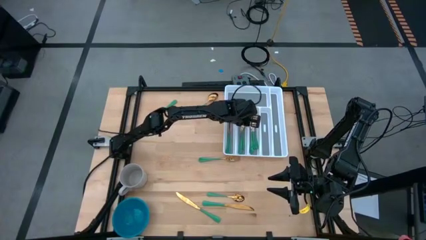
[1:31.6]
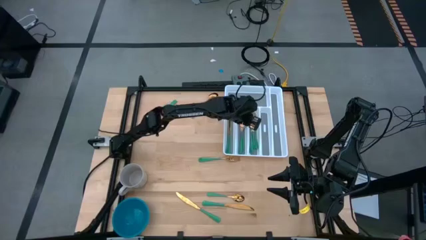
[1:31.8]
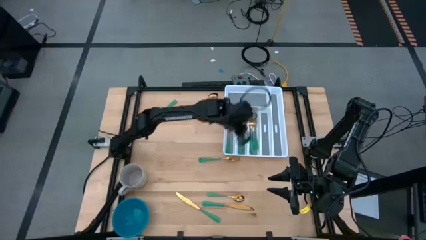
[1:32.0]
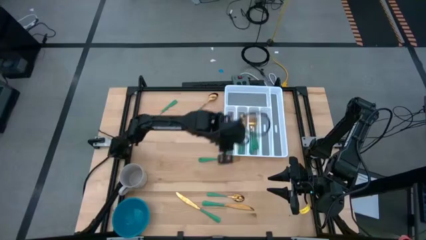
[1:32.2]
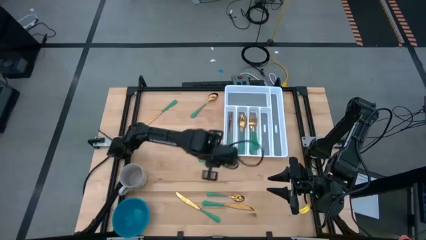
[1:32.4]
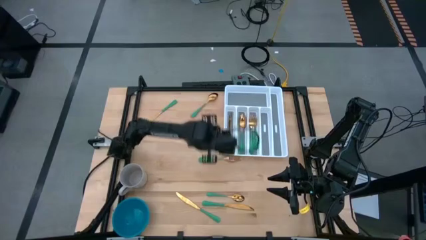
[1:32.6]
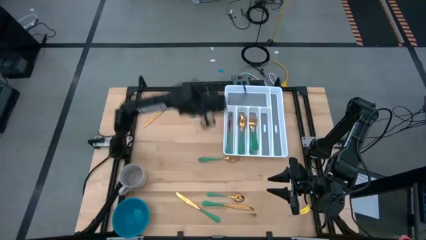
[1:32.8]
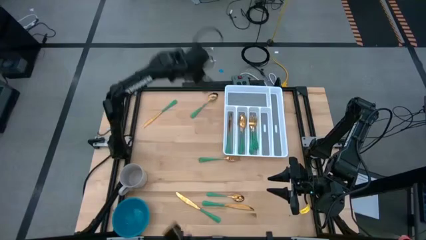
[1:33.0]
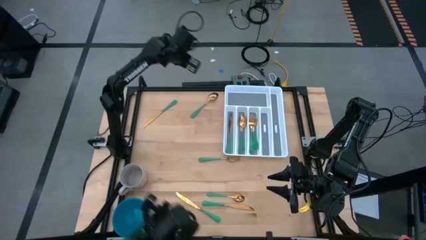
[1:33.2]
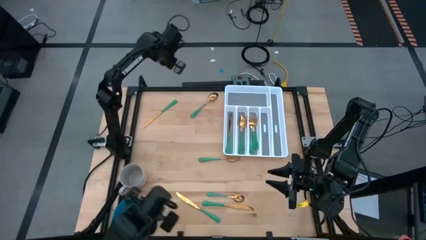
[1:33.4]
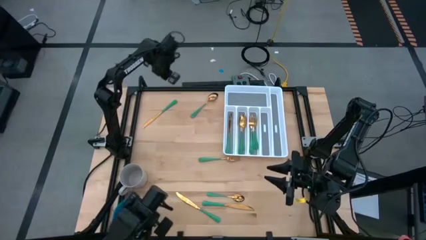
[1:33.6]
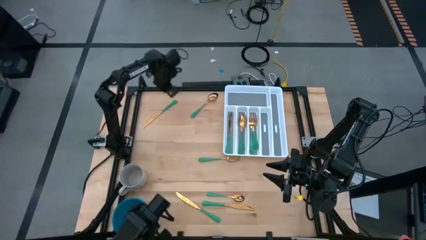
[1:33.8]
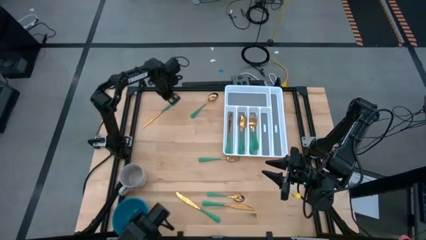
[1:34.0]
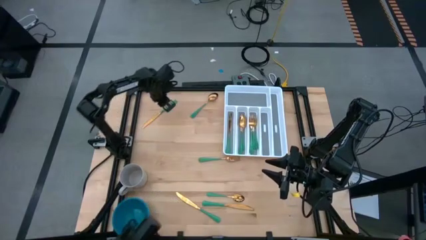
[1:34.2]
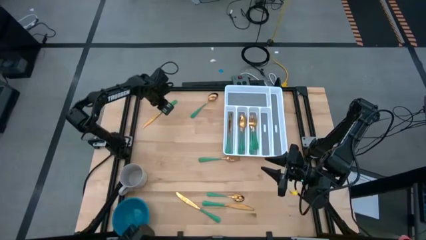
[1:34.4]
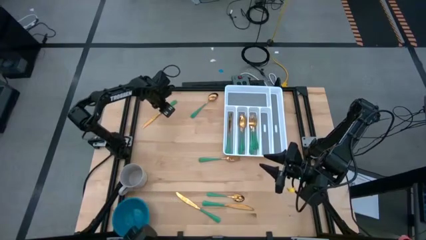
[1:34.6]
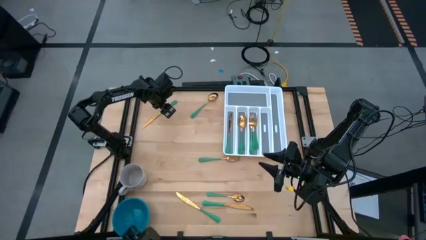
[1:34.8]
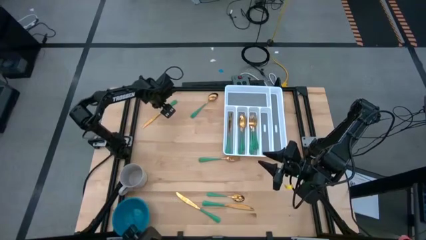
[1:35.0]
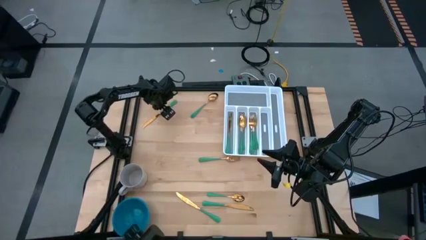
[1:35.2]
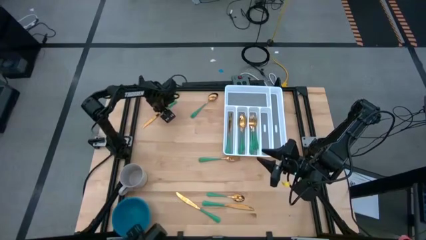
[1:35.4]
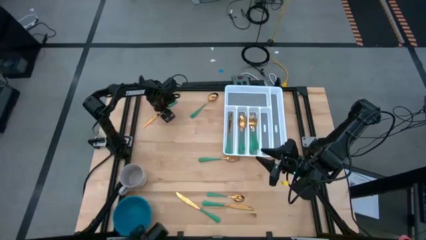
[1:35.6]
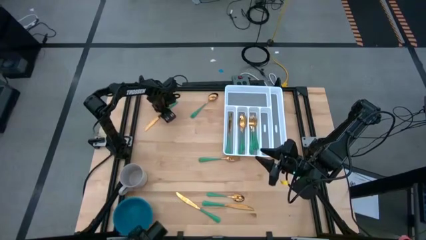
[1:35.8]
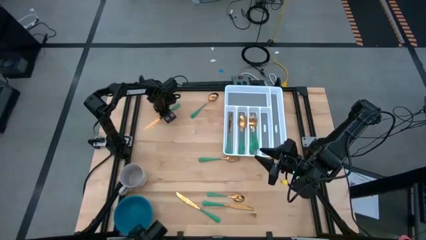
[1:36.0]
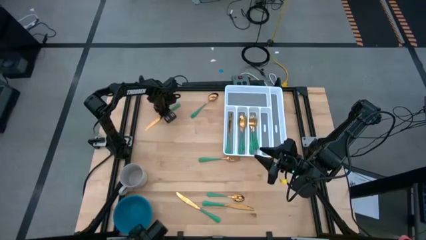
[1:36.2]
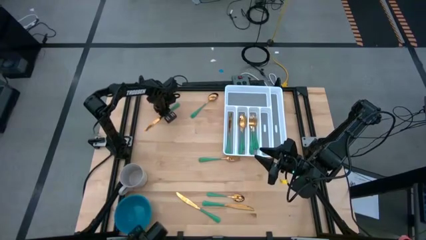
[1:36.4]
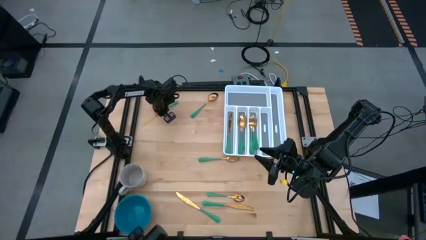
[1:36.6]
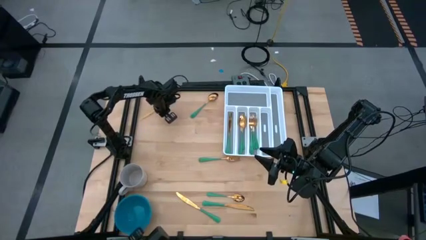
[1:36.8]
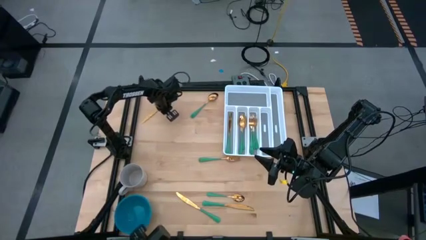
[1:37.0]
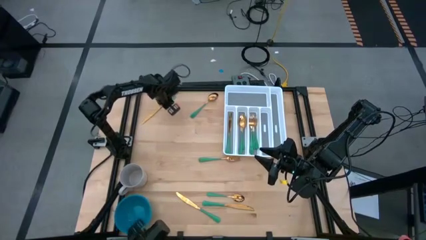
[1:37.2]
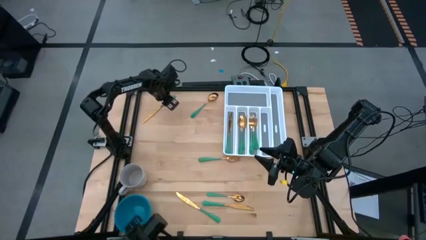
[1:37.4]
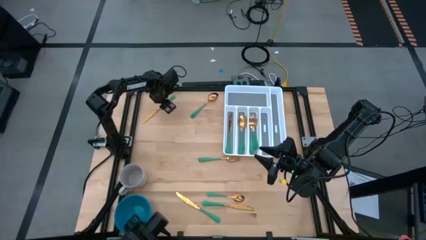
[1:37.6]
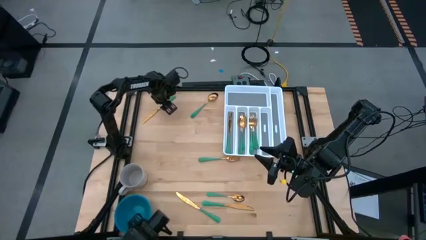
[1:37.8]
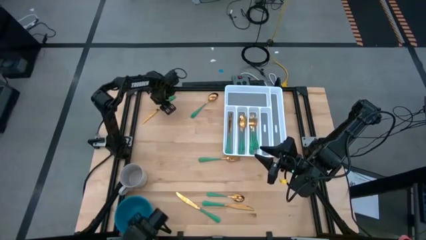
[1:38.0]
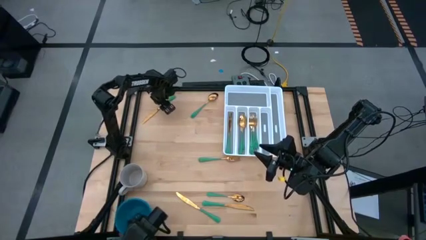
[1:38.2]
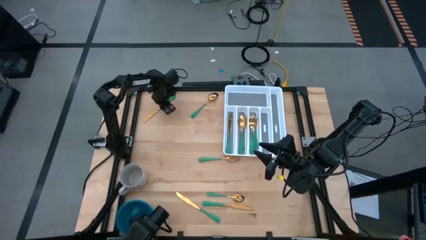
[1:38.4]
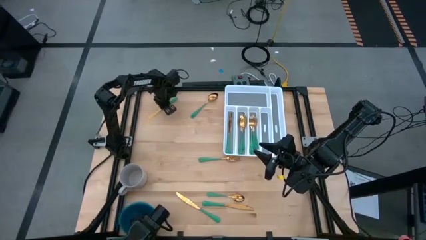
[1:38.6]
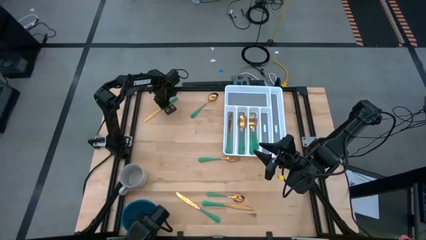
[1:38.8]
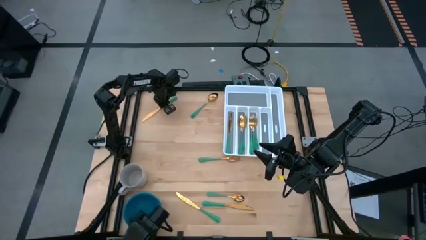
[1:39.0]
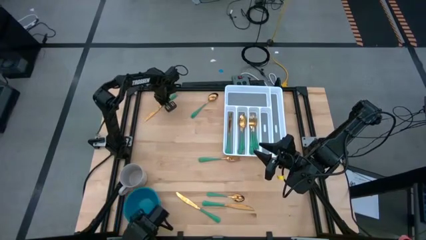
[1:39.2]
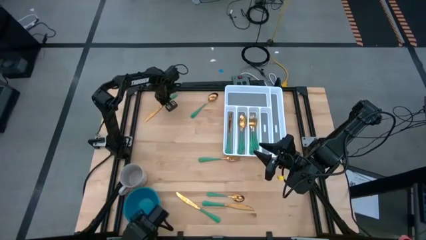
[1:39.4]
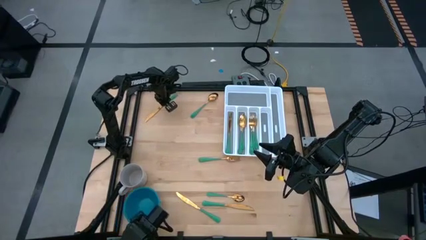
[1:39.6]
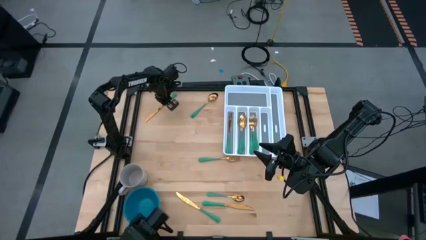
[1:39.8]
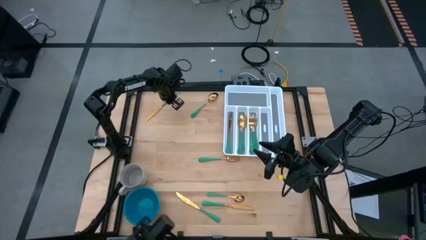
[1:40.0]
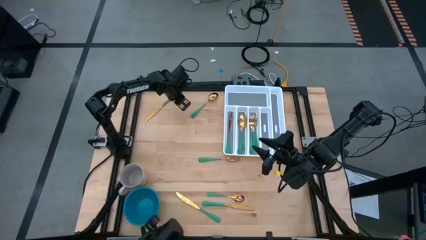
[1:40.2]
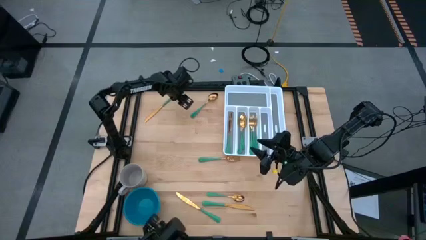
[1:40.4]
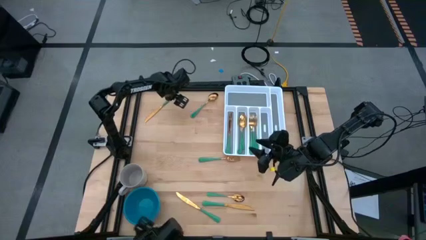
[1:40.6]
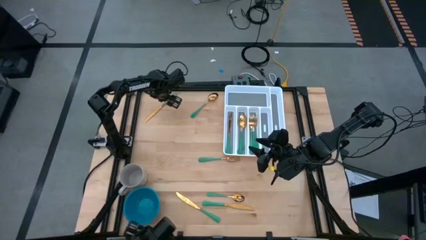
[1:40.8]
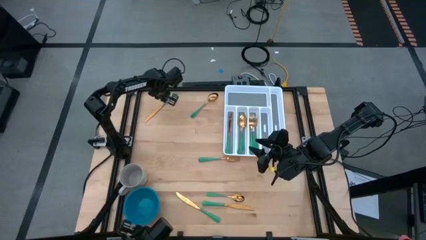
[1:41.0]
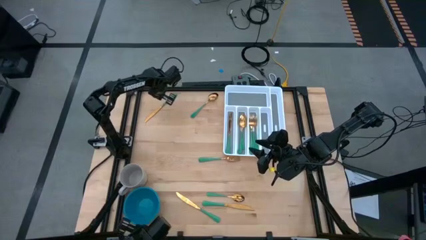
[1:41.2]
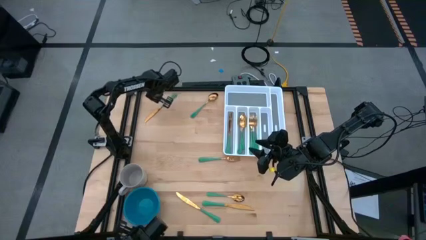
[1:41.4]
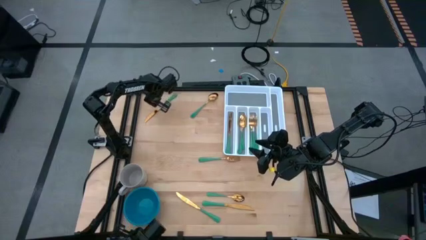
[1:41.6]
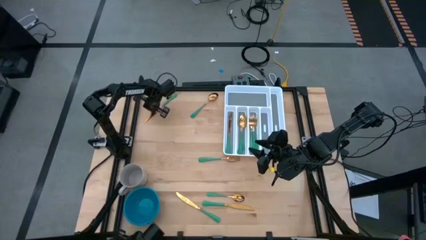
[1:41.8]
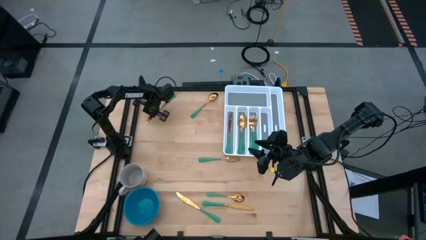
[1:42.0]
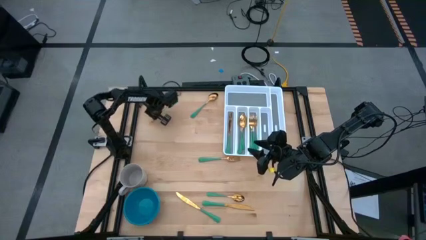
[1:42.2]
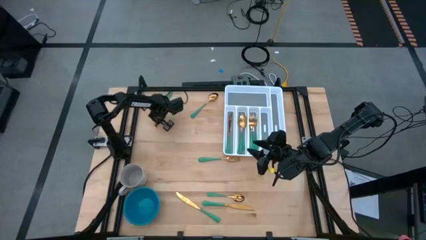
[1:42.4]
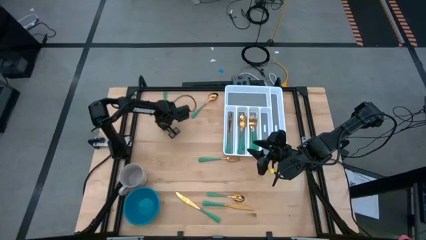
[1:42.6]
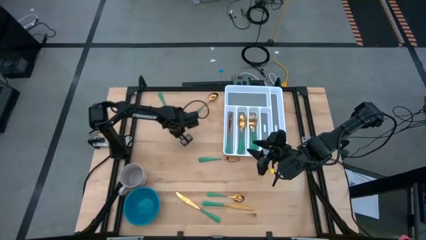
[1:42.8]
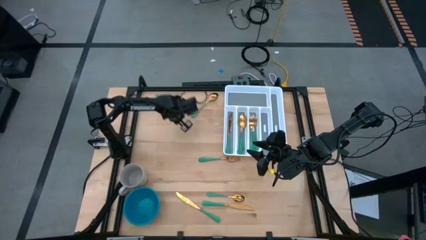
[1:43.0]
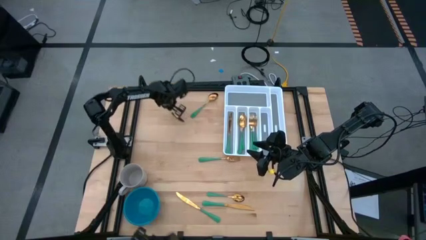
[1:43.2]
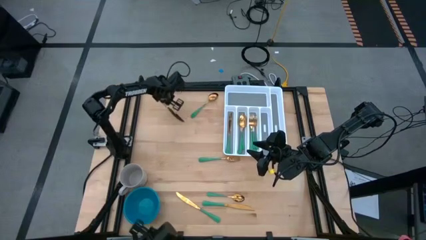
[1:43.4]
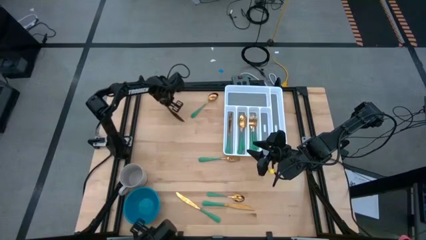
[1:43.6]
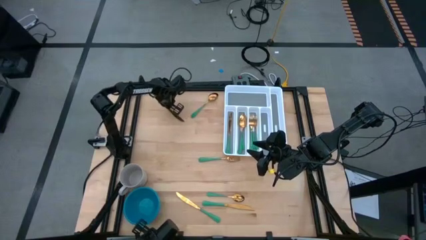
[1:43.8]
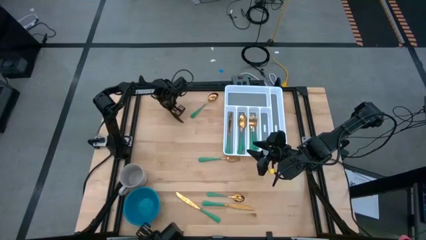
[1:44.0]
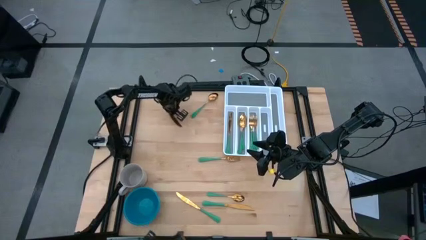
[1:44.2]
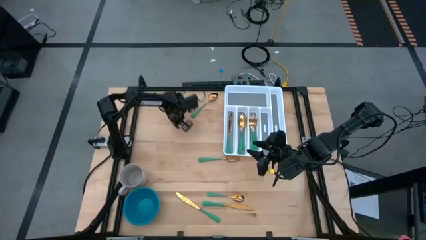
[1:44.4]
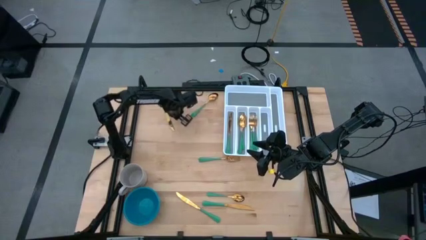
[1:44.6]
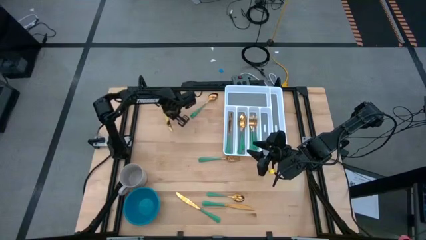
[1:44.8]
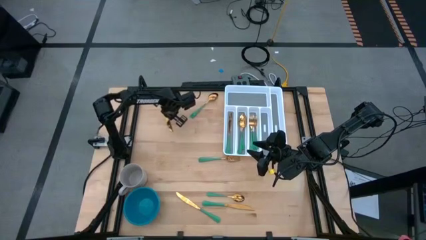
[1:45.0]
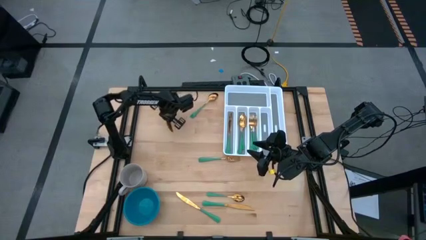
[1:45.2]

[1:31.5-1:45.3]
Task: Sort silverware
Put the top green table knife into the white cutlery tray
